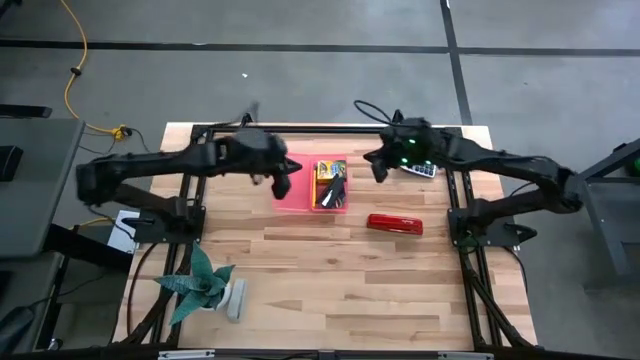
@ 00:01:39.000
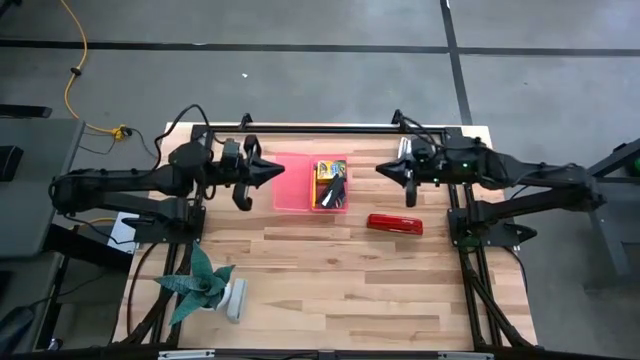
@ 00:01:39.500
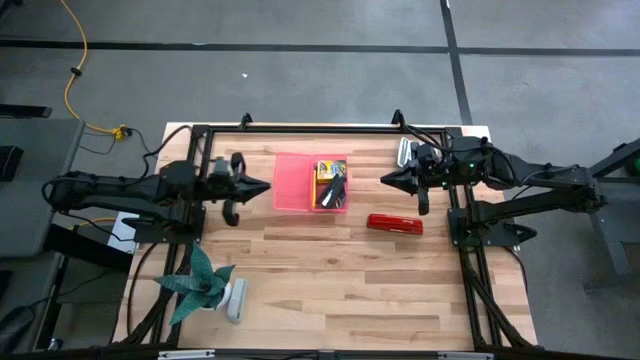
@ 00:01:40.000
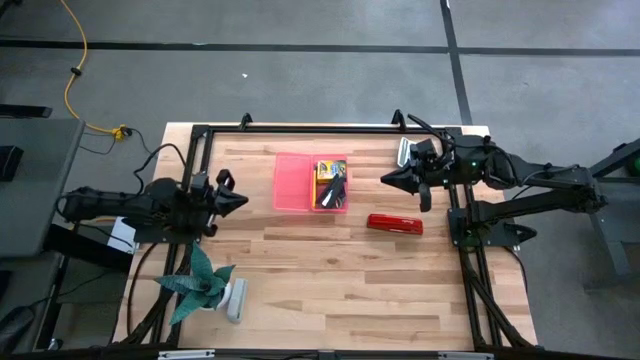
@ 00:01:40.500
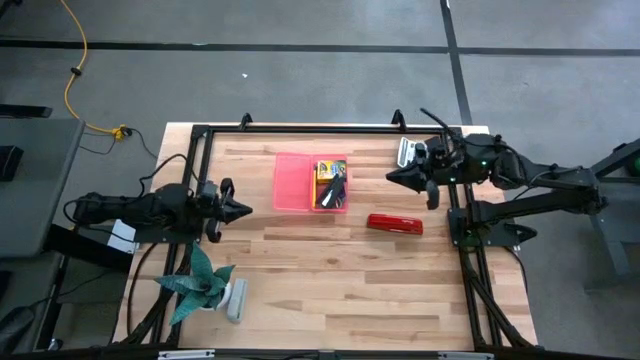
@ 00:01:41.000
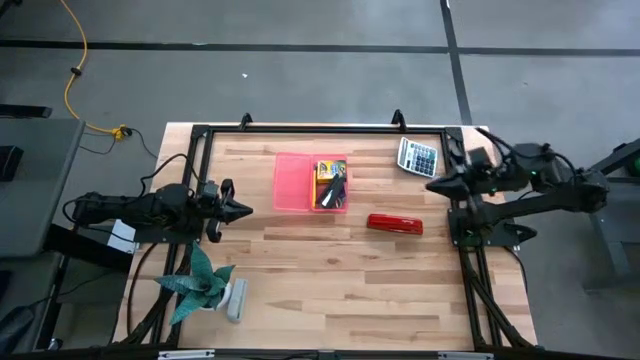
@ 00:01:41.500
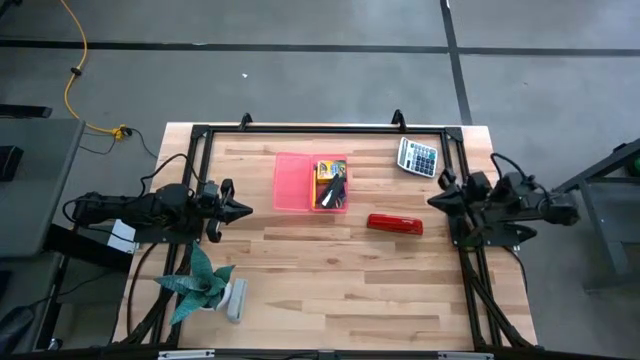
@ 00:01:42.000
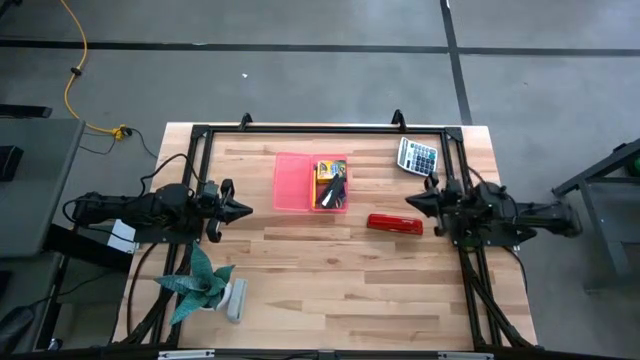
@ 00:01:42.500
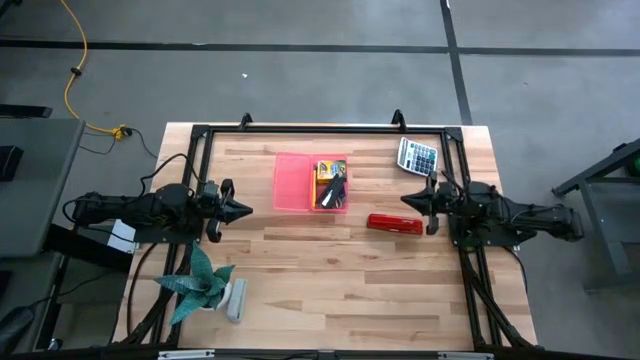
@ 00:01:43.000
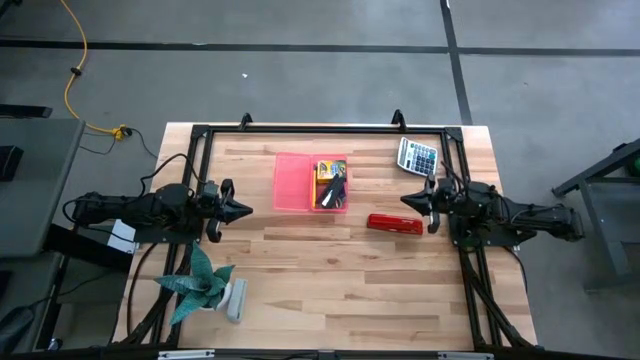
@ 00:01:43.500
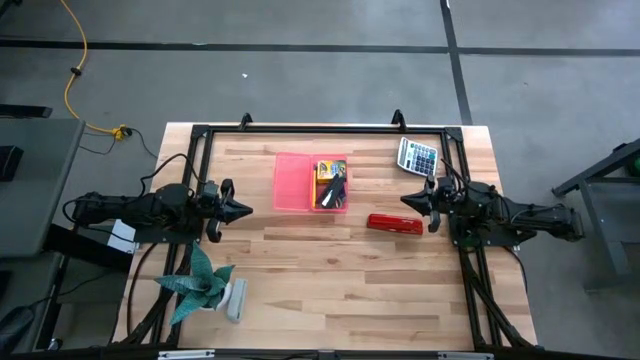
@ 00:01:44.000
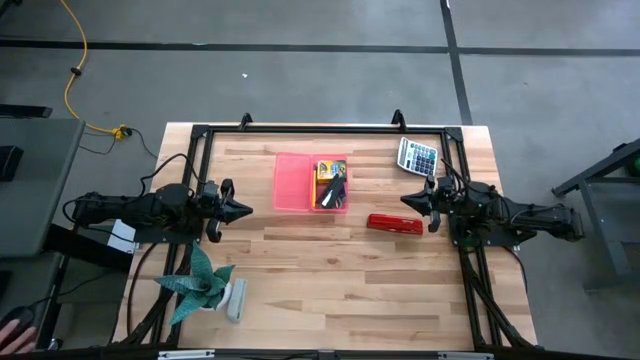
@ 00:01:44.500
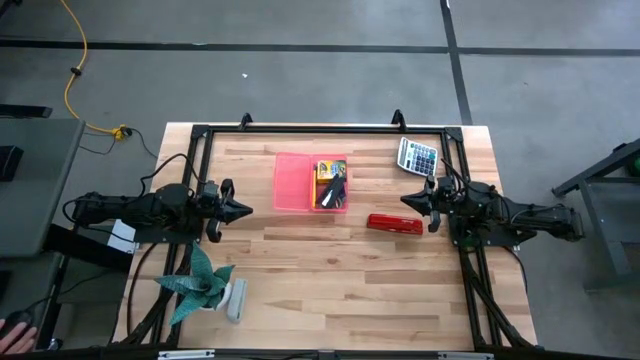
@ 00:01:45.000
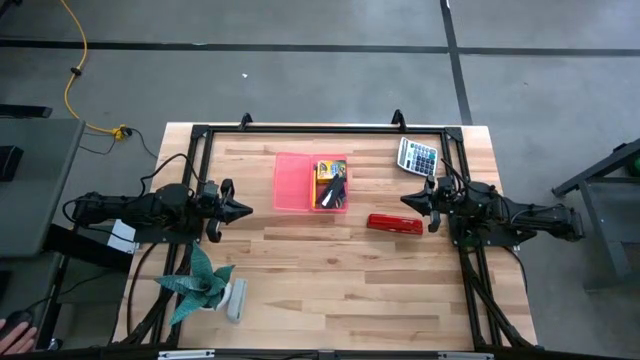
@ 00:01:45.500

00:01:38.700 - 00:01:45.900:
Task: Pack school essentials
Return to Home Position

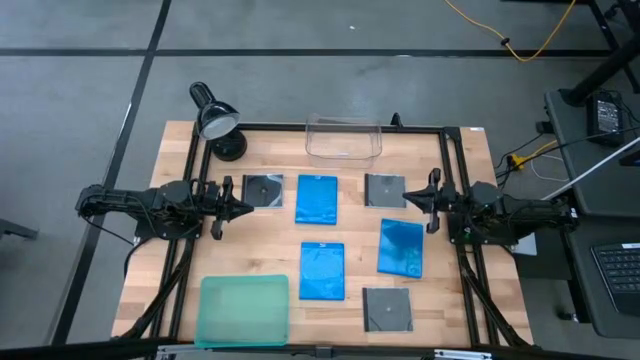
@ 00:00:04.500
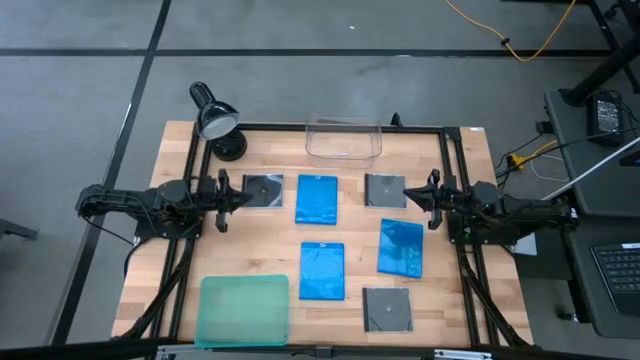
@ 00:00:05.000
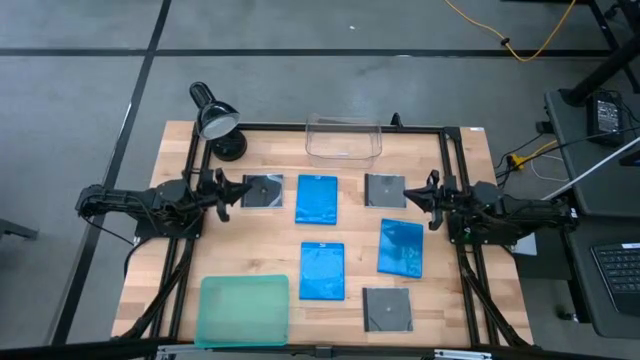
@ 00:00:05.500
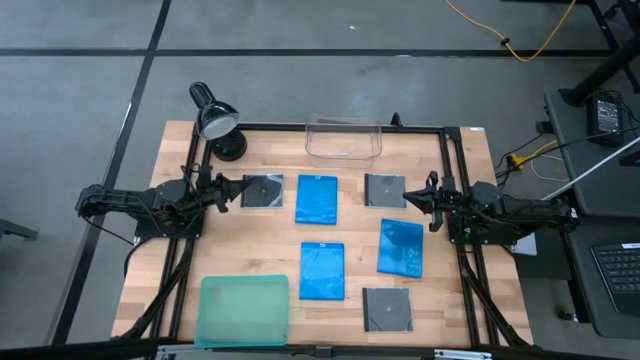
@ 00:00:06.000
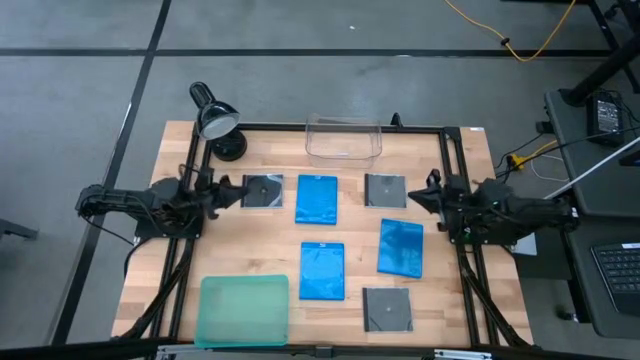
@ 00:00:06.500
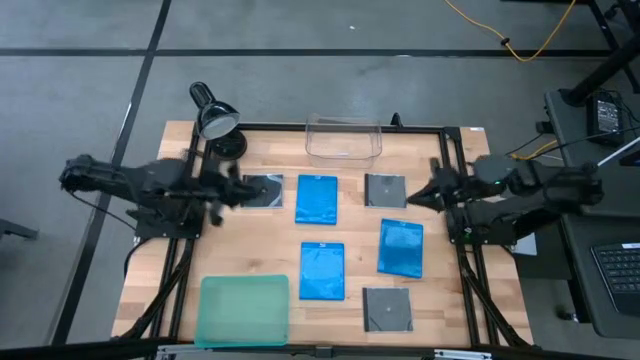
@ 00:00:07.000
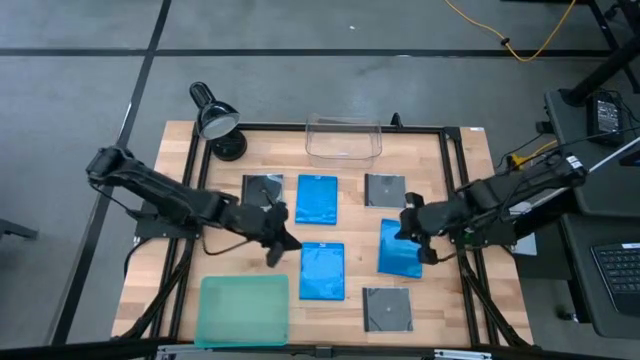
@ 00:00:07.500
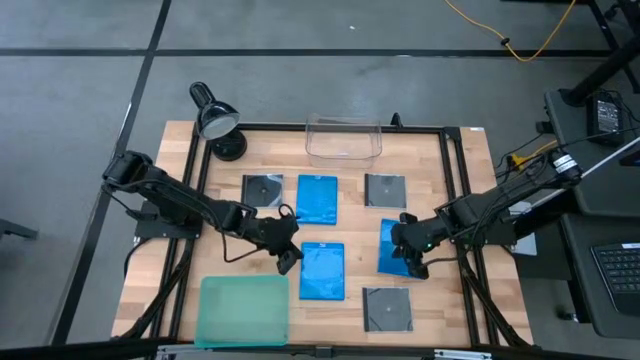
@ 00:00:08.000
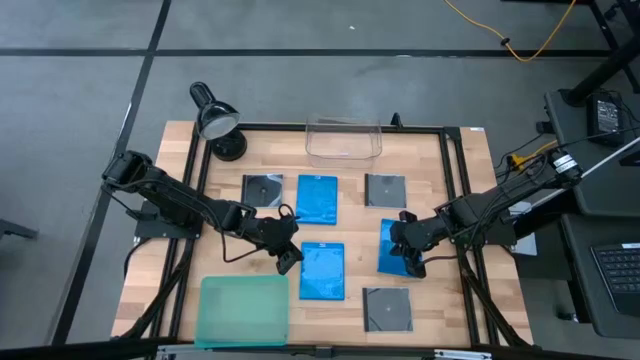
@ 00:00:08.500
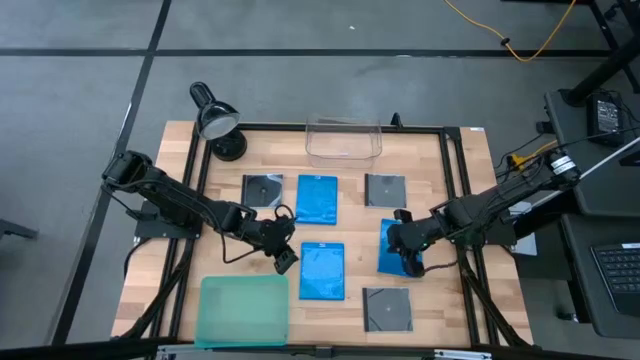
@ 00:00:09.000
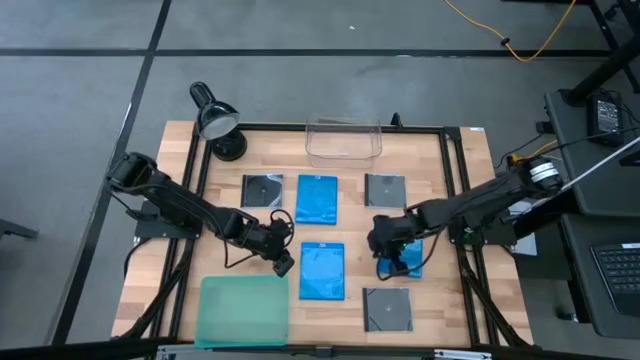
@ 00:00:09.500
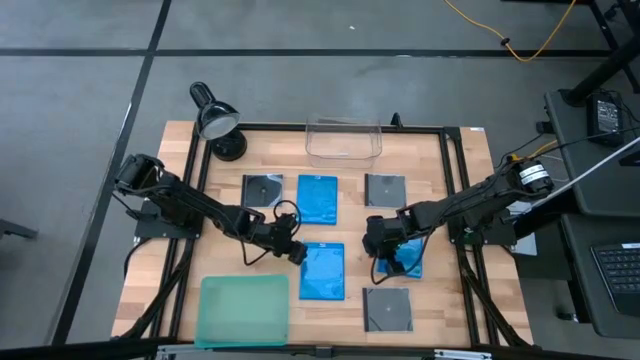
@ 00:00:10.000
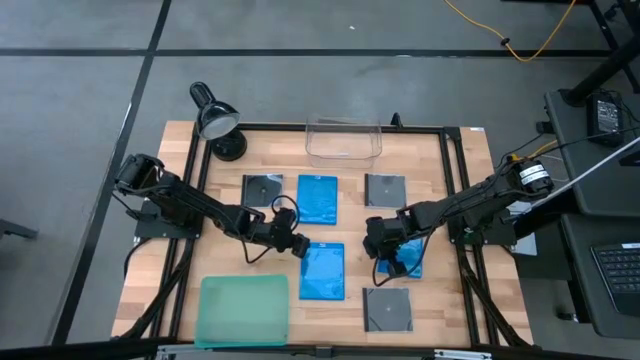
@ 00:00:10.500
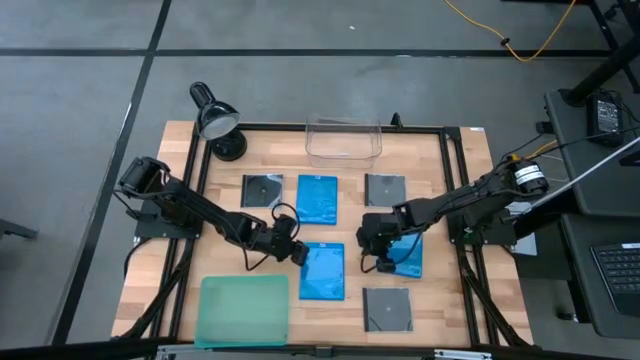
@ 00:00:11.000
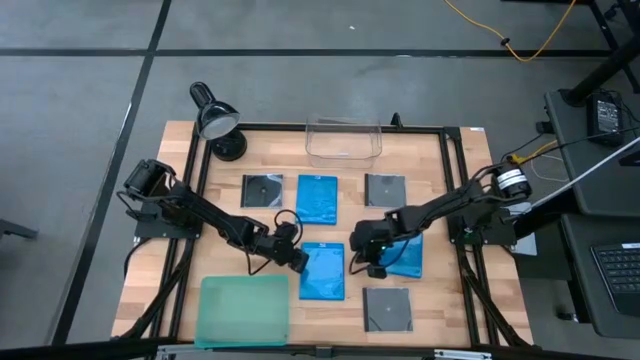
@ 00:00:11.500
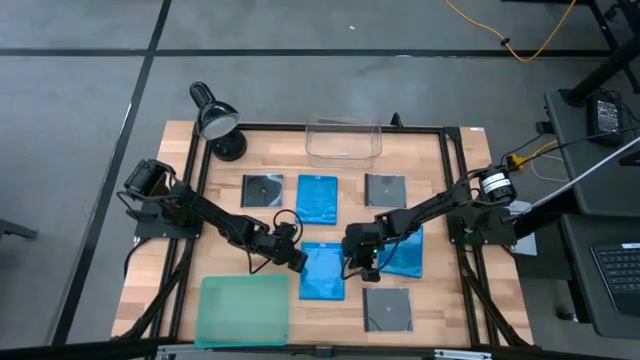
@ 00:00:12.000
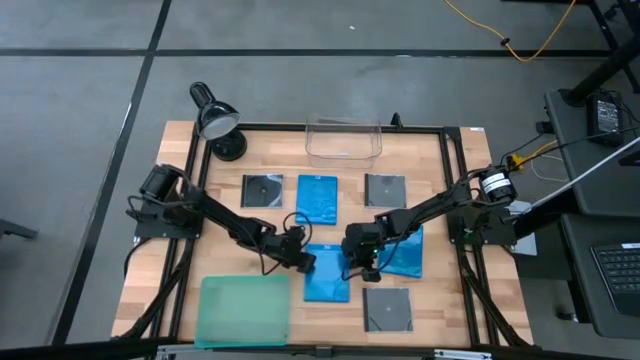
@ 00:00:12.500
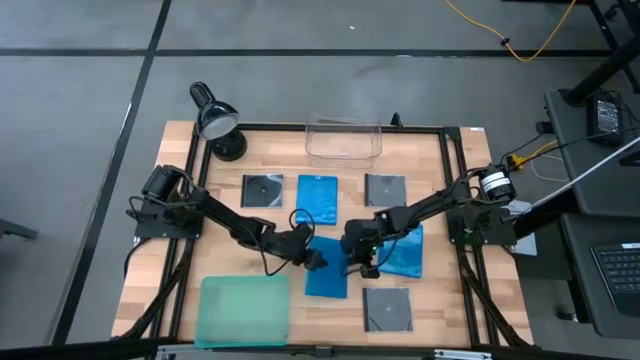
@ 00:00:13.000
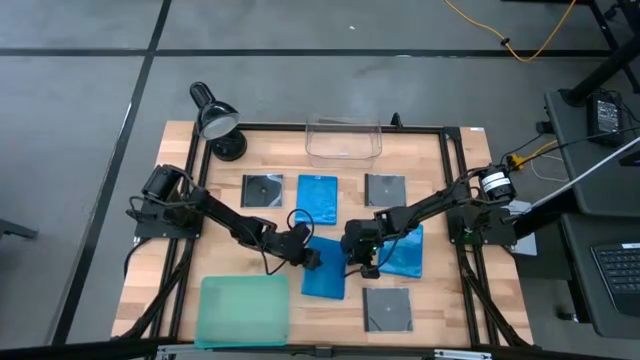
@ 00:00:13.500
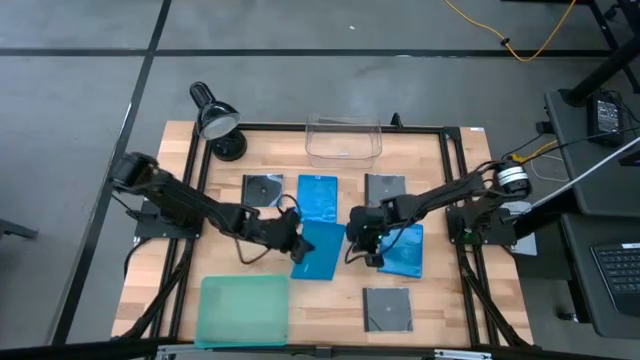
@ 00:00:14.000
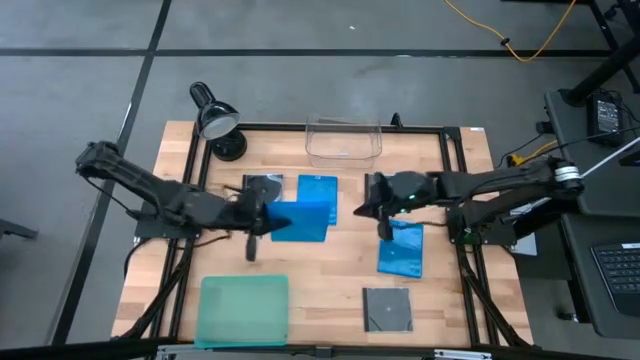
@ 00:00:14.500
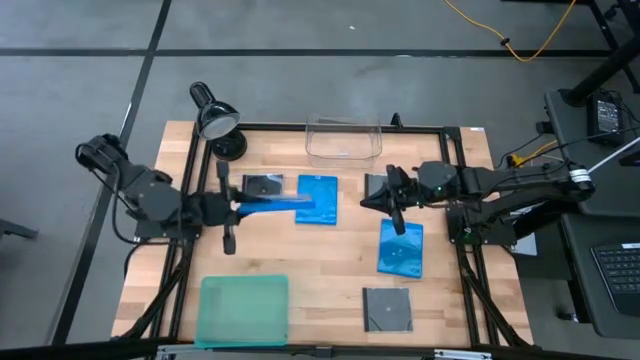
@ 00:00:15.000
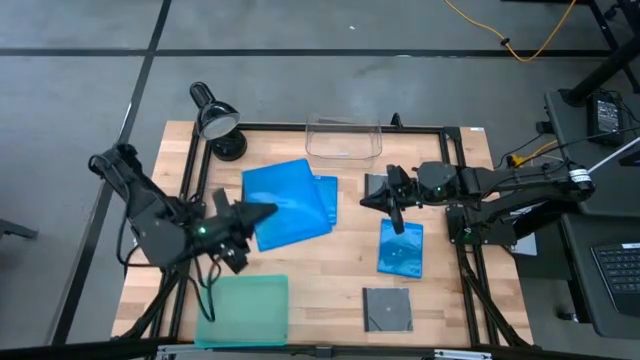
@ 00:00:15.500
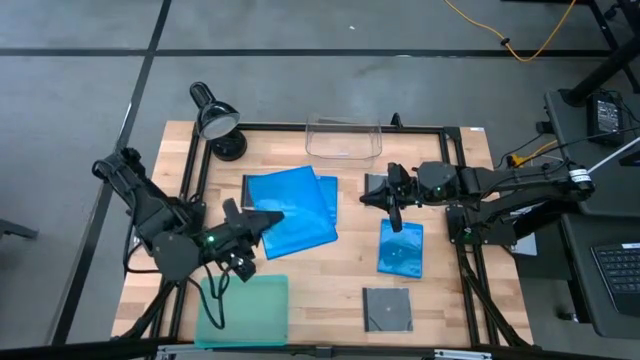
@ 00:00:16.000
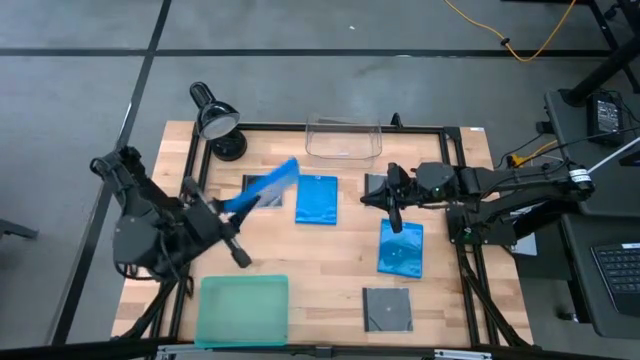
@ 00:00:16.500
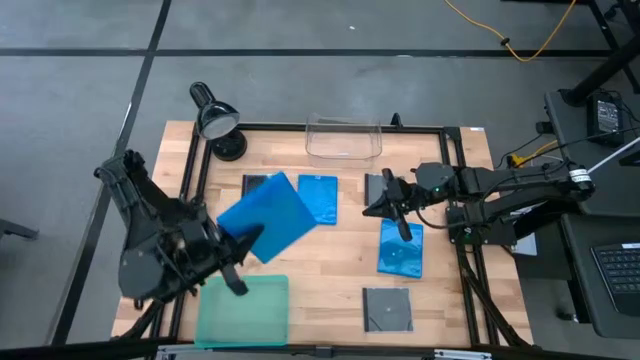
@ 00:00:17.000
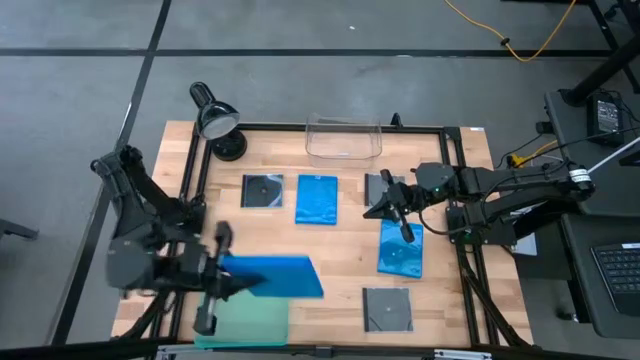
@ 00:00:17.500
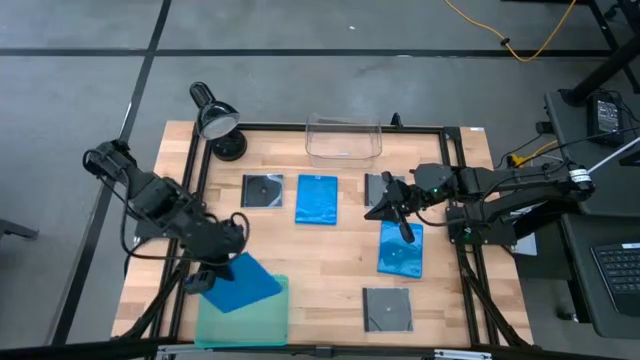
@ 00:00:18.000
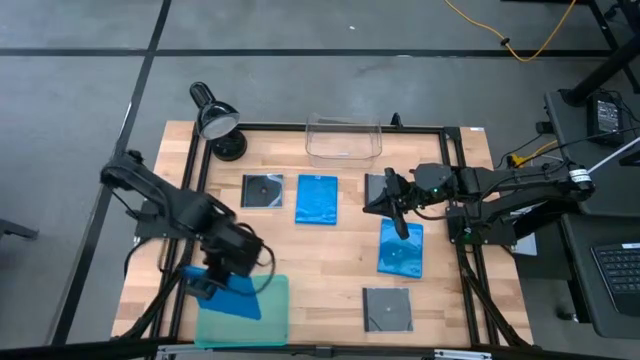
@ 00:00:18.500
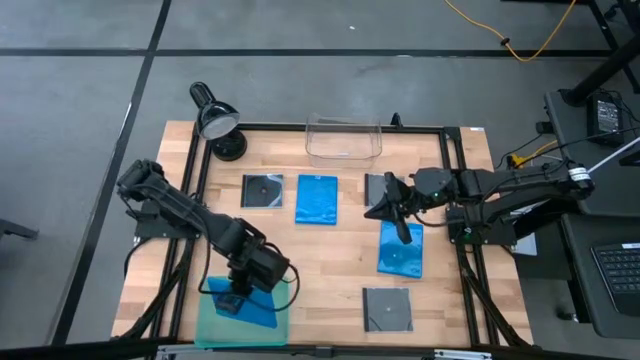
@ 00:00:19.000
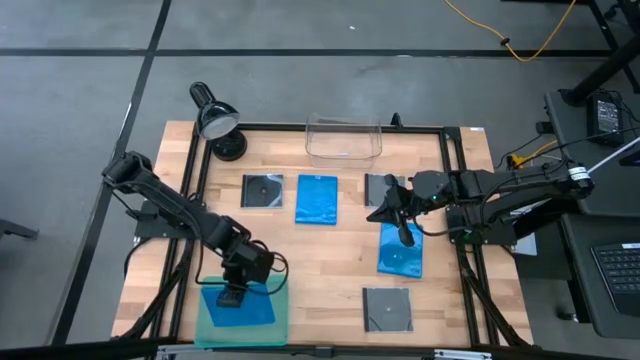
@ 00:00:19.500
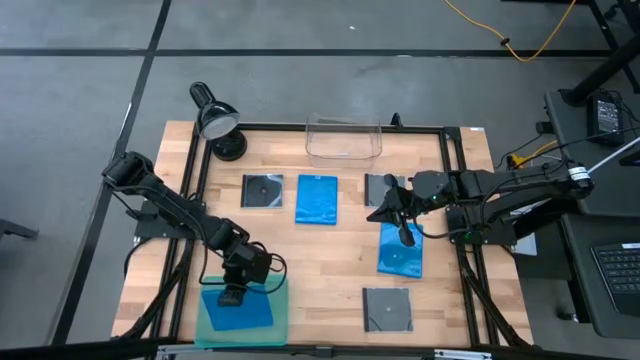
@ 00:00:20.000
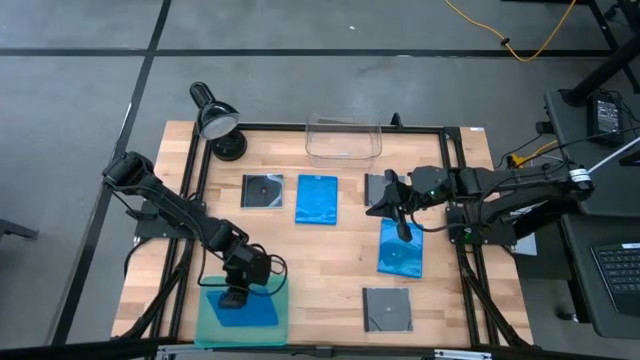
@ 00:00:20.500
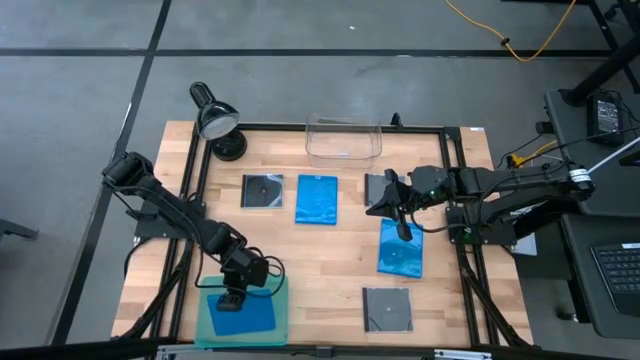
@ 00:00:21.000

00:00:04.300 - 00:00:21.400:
Task: Pick & place jewel cases by type
Put the bottom left blue CD case into the blue bin
